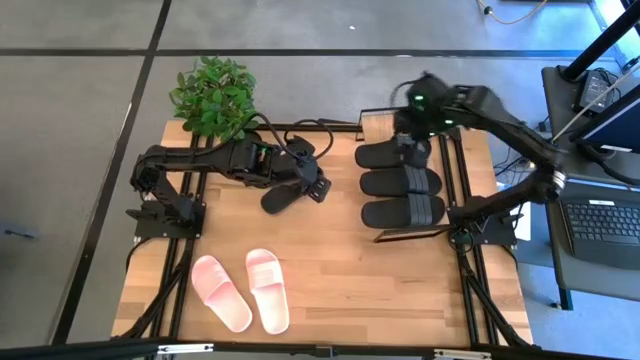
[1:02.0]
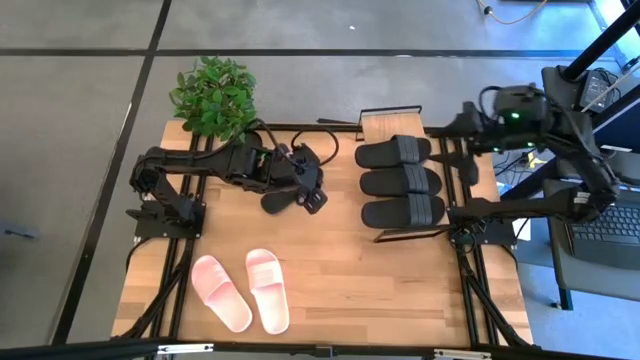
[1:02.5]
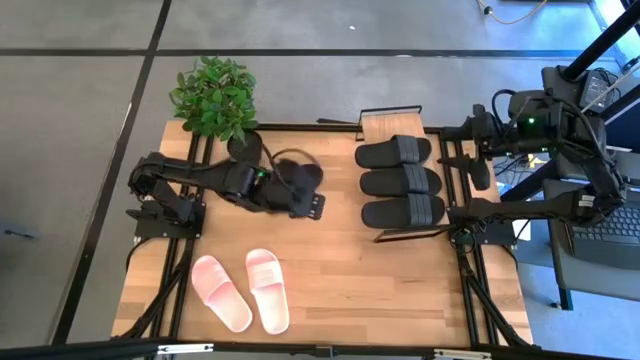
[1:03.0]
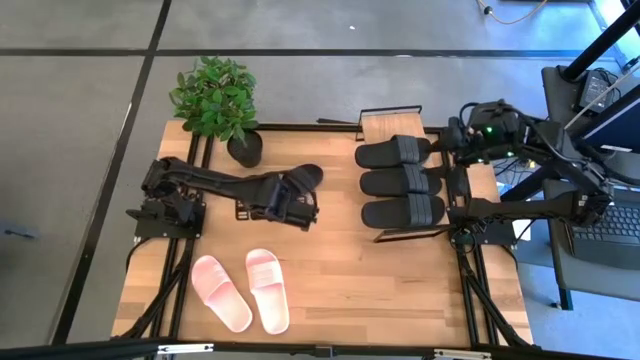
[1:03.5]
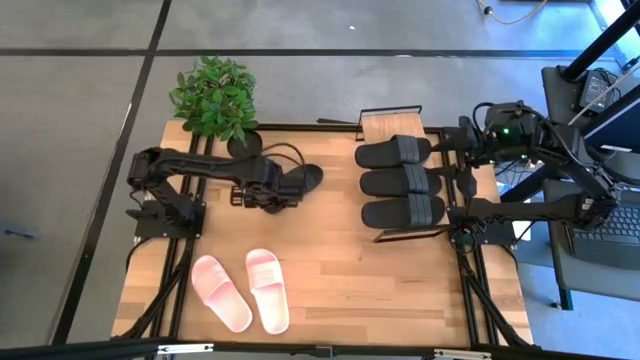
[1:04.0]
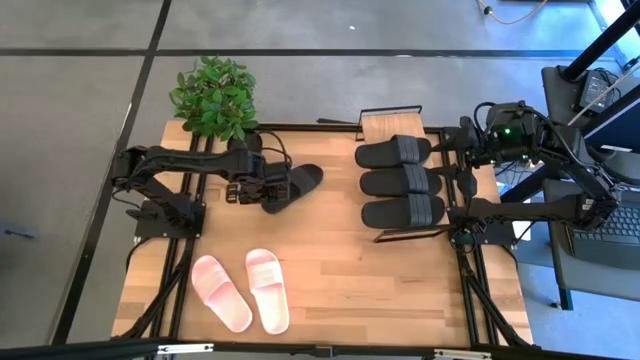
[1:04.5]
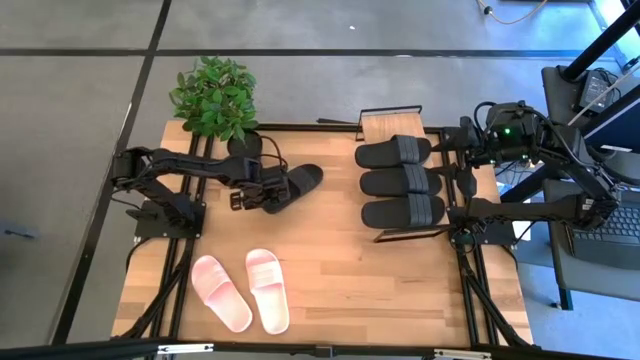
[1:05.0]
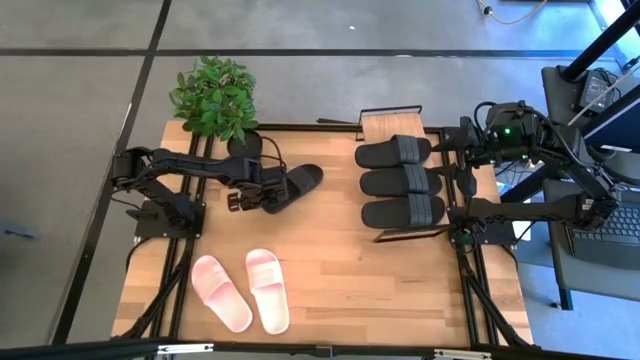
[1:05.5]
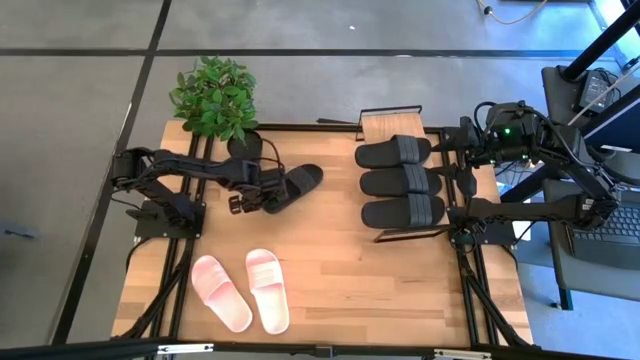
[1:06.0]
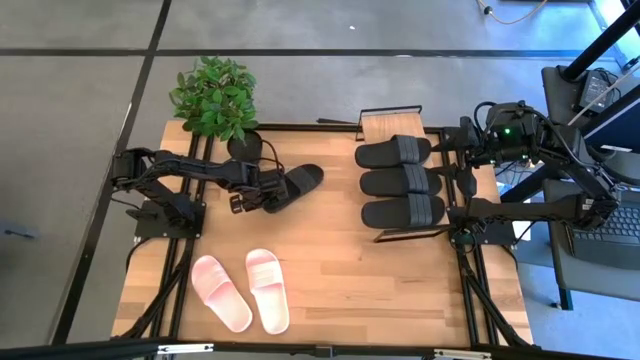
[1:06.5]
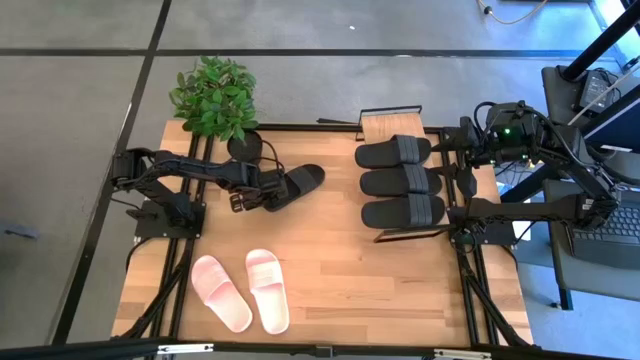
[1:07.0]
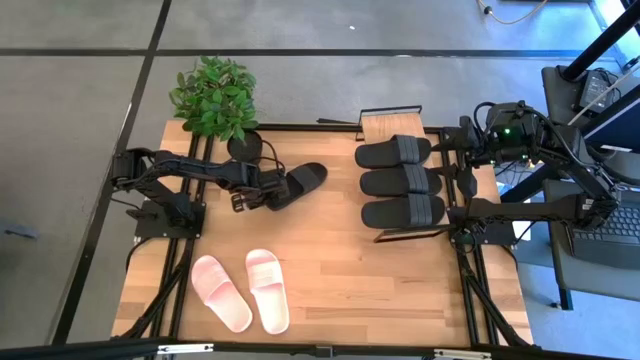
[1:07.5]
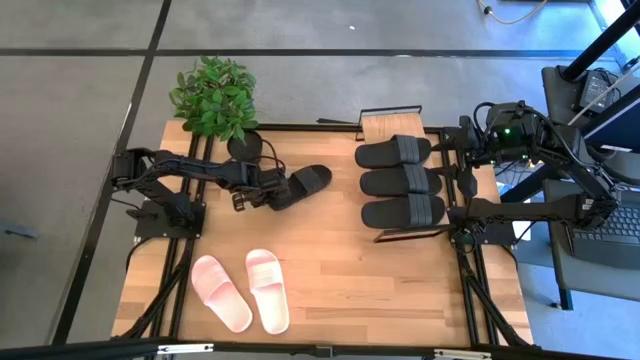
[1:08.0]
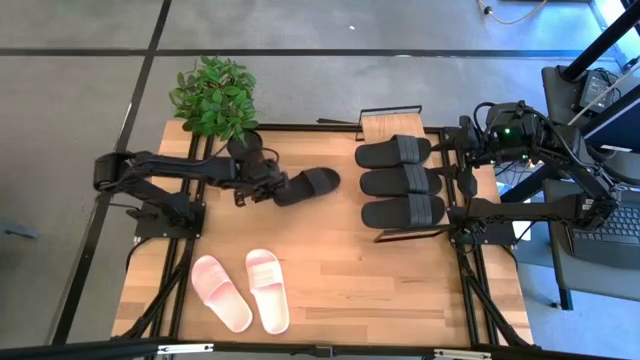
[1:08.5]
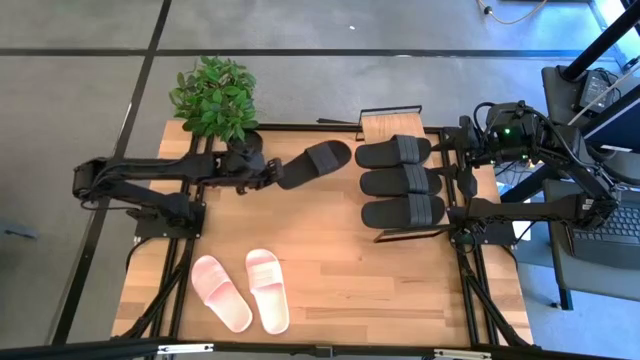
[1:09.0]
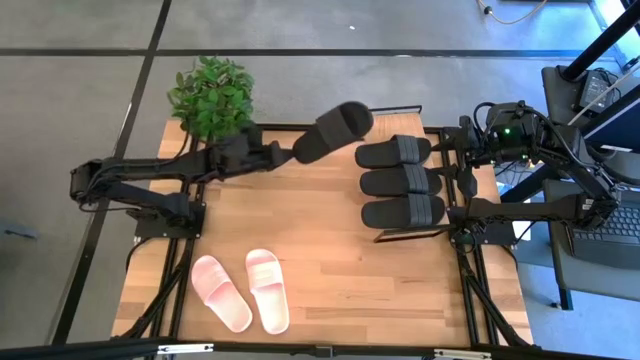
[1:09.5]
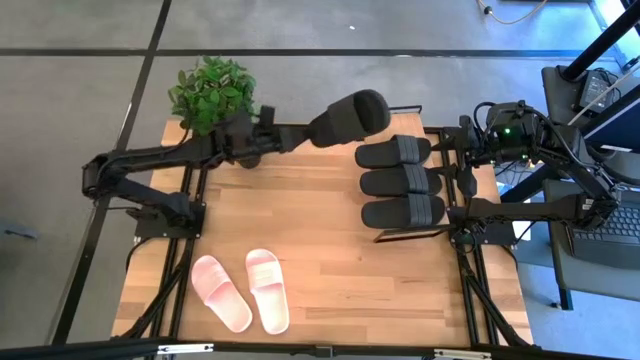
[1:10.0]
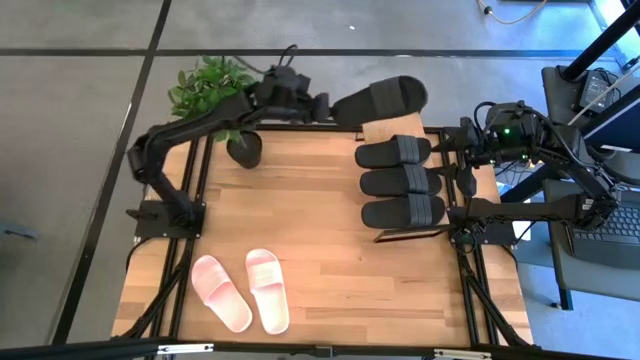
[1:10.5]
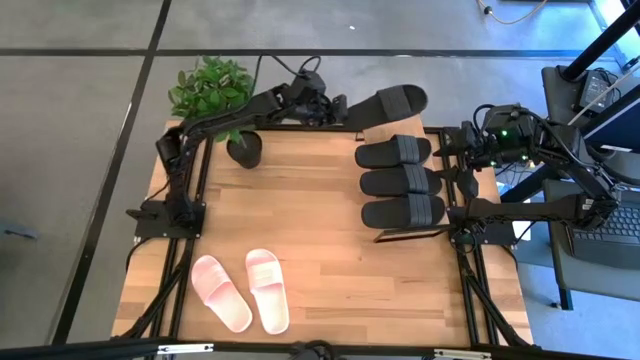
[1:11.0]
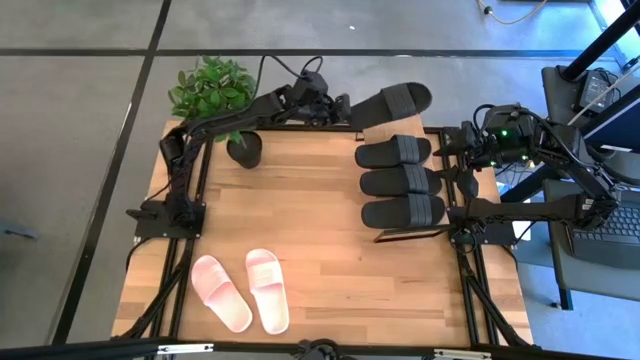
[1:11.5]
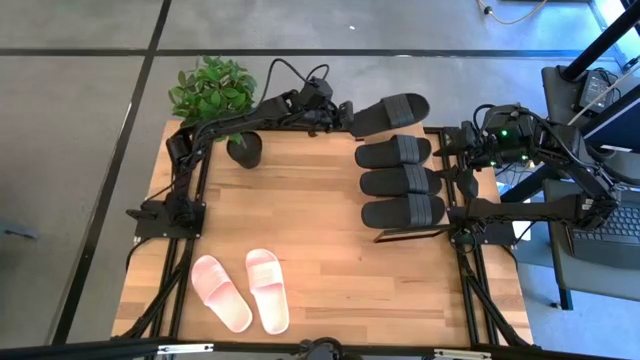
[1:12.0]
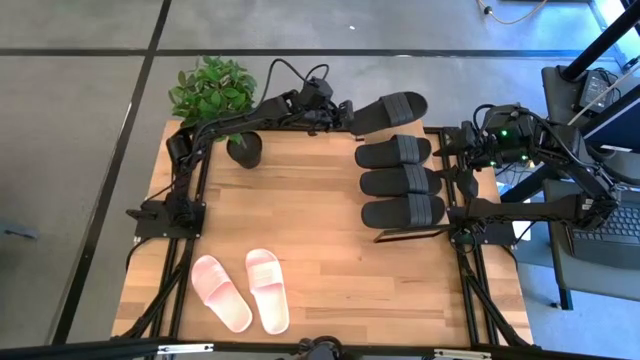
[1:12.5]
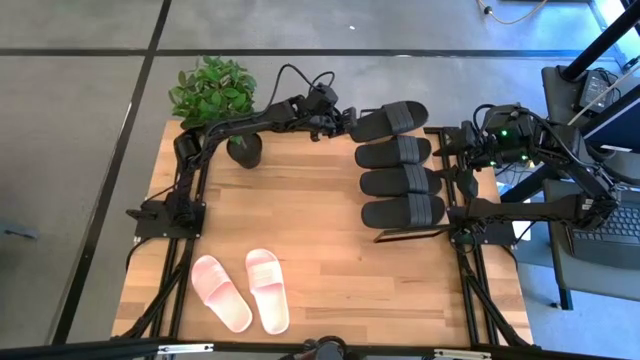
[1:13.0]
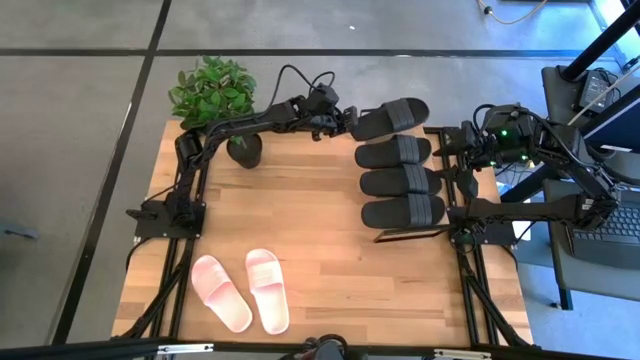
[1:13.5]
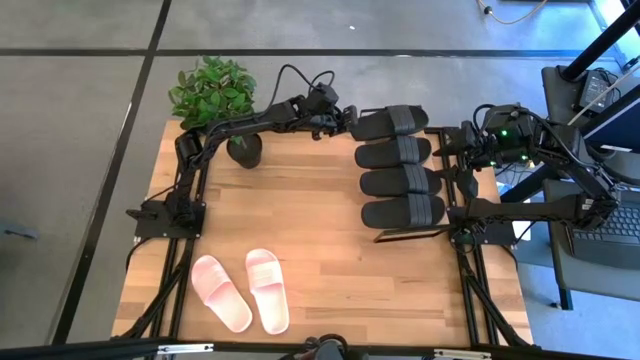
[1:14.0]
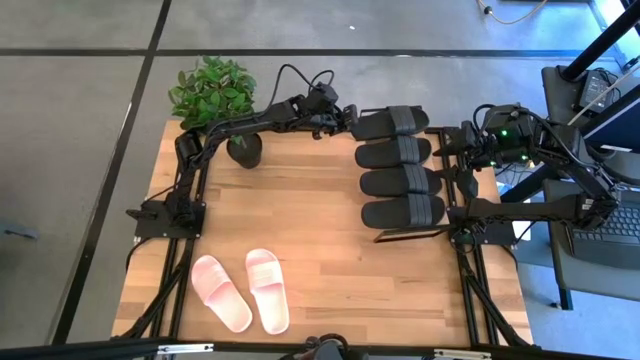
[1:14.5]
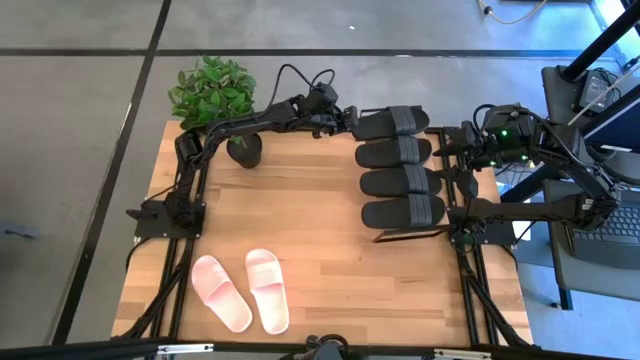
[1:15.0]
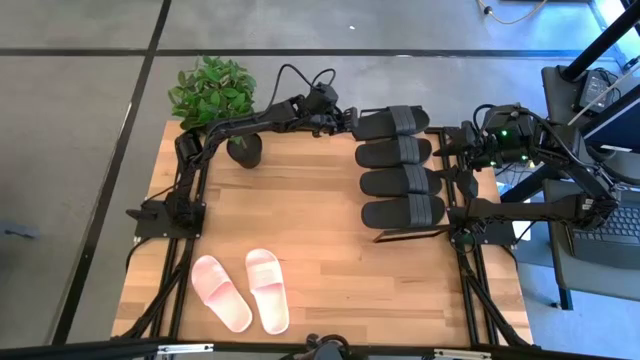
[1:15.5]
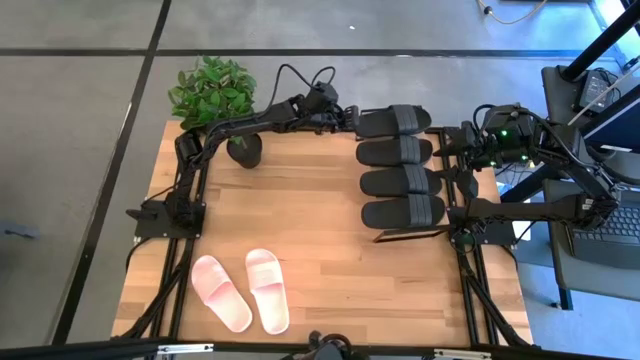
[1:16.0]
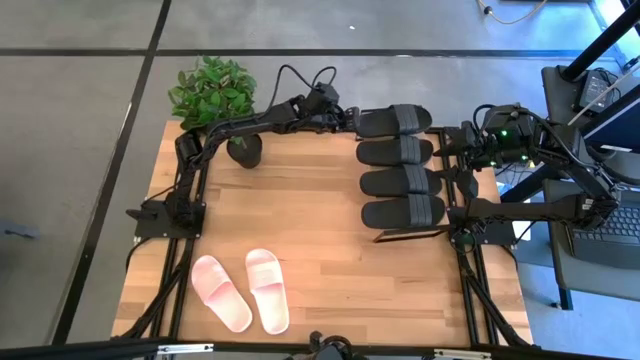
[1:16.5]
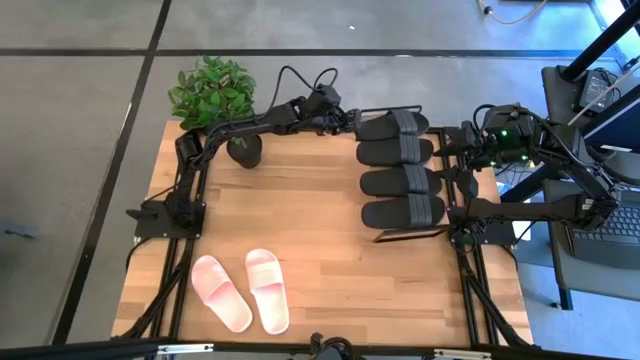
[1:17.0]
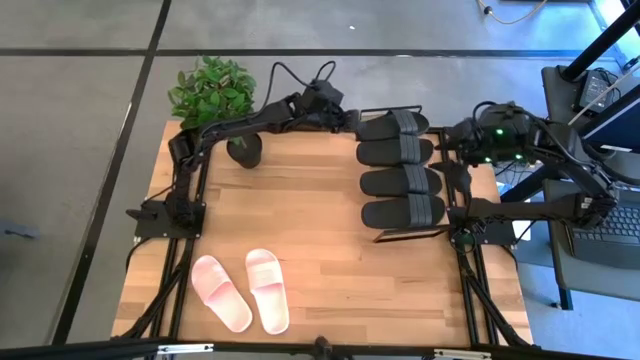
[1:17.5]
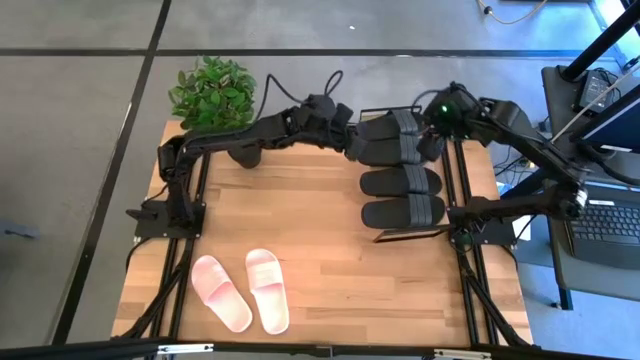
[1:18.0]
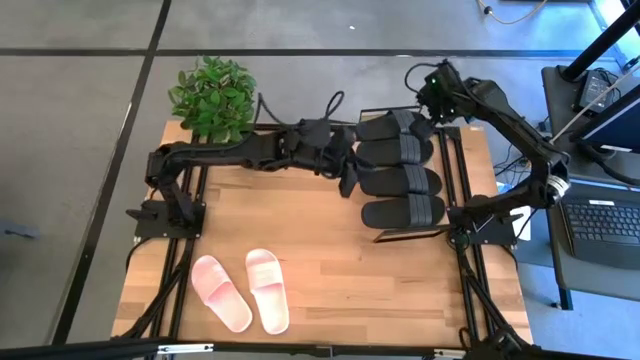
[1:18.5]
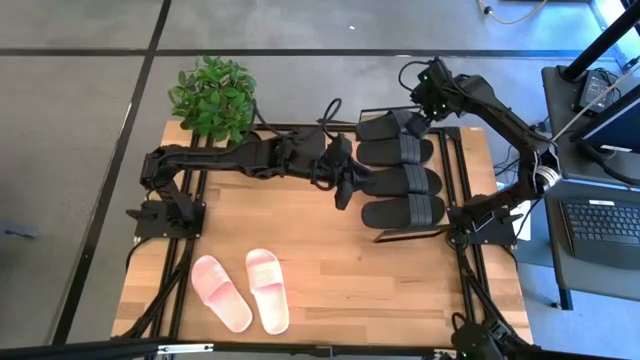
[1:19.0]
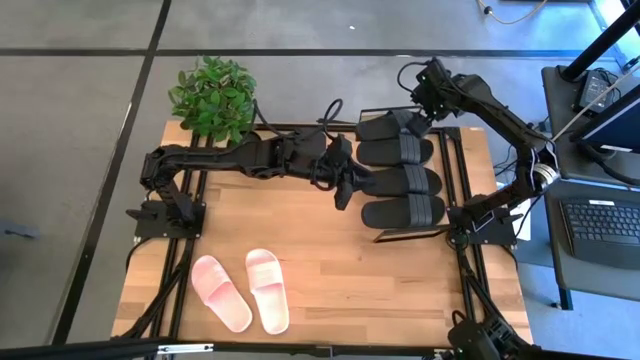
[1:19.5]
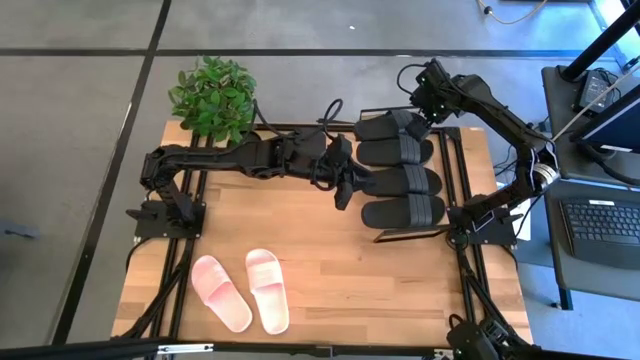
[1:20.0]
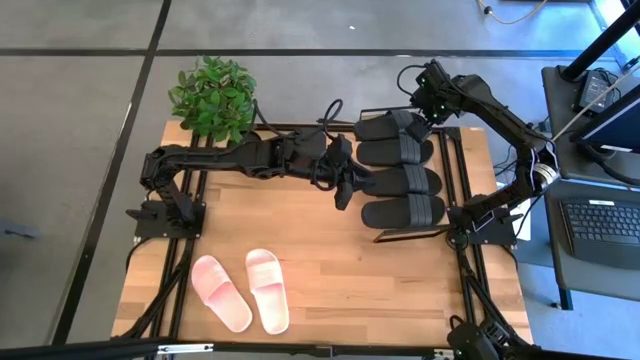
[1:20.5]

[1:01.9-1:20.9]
Task: Pick and place slides into the shelf
Put the black slide on the shelf

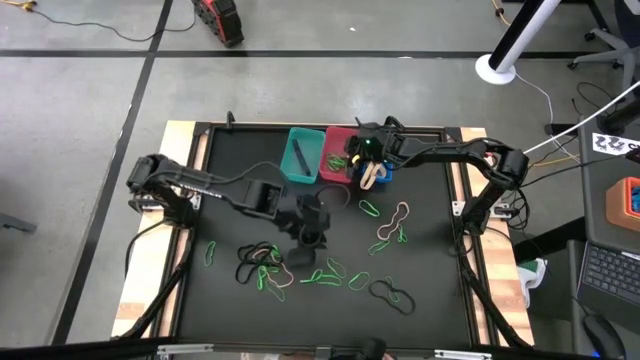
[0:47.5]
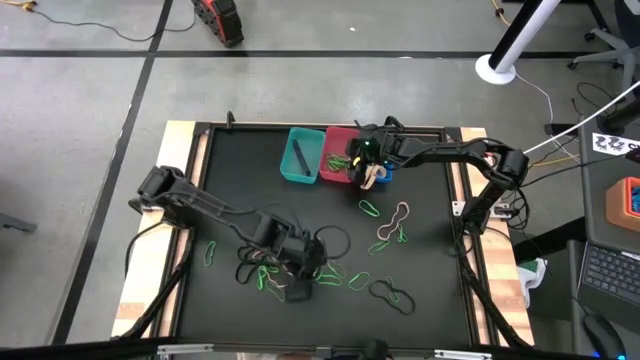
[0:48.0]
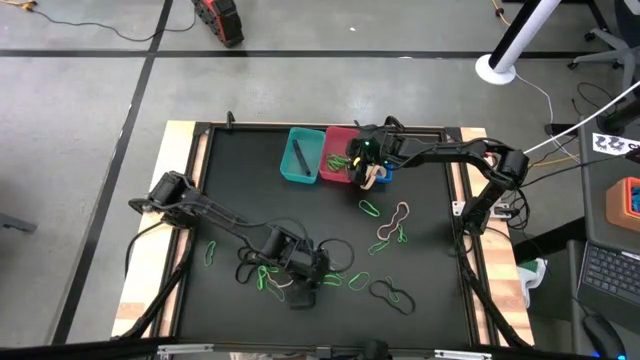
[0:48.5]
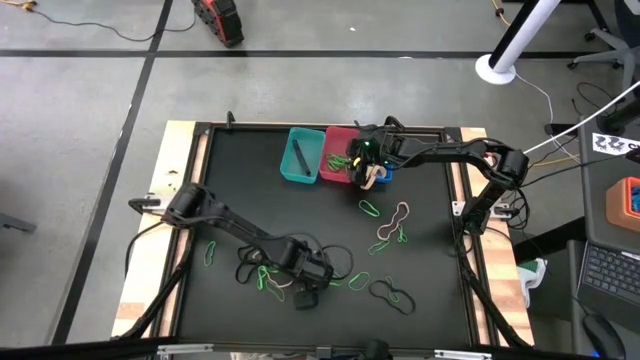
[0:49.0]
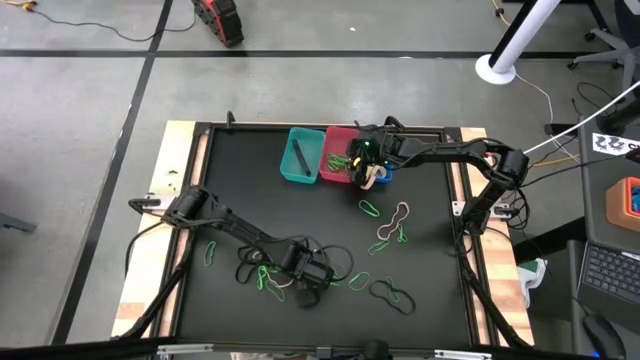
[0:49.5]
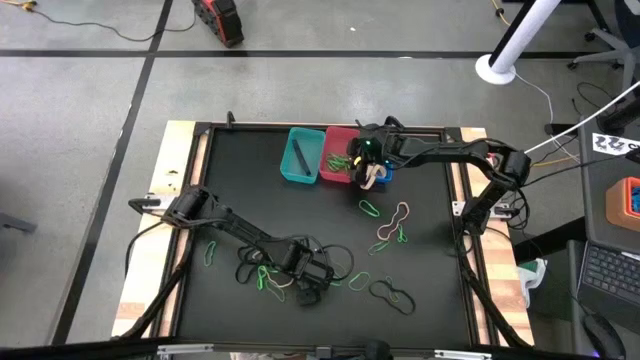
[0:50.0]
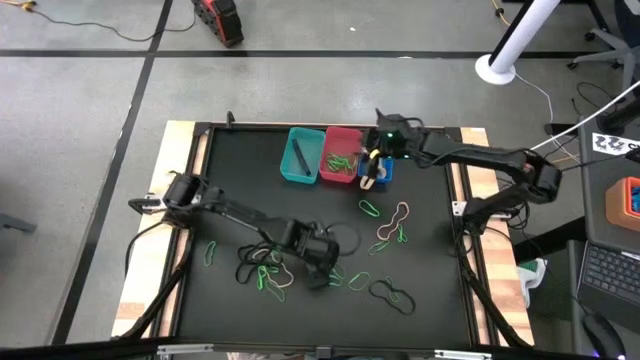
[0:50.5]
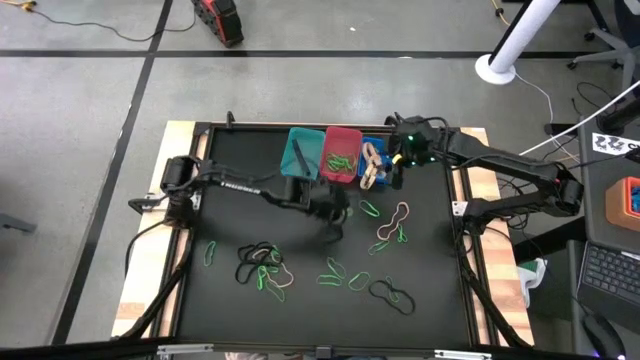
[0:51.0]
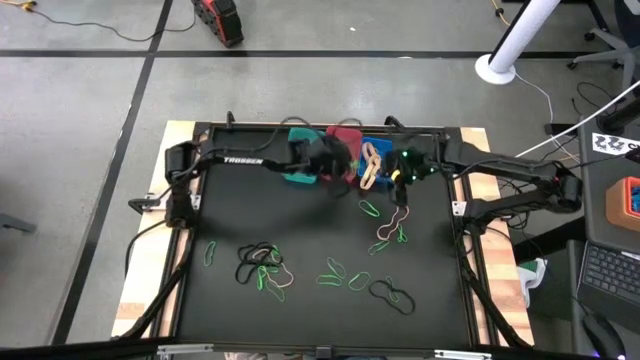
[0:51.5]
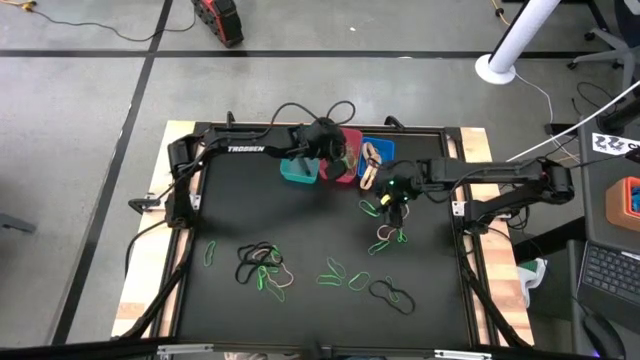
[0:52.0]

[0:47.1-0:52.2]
Task: Sort rubber bands into baskets
Put the green rubber band into the pink bin
